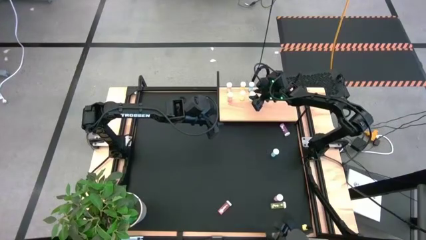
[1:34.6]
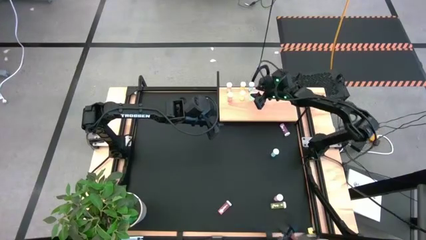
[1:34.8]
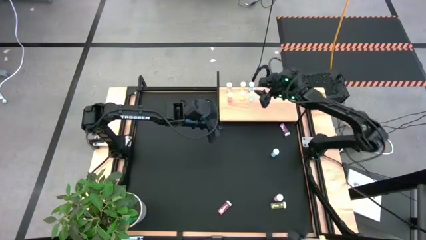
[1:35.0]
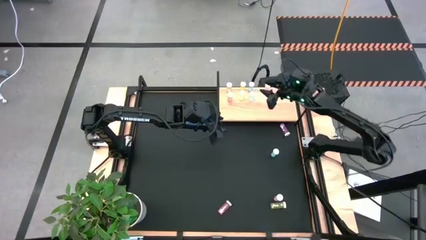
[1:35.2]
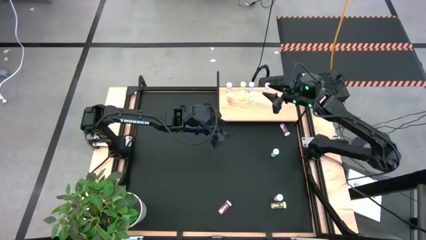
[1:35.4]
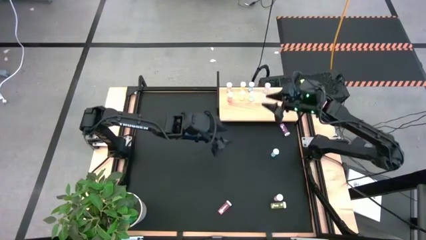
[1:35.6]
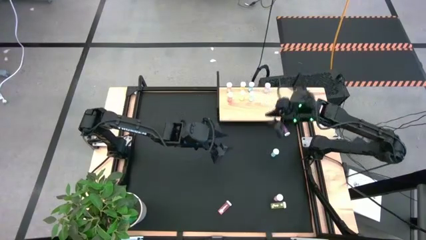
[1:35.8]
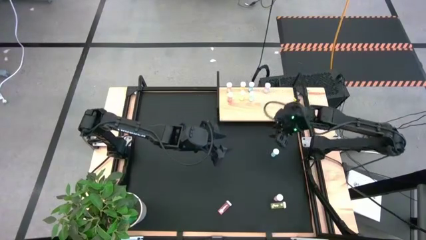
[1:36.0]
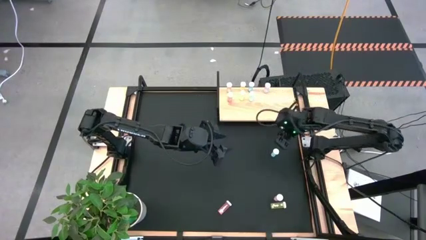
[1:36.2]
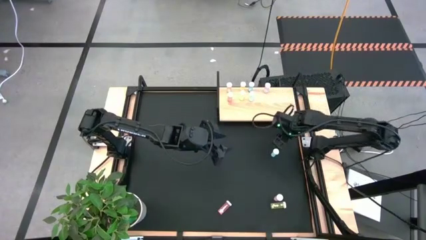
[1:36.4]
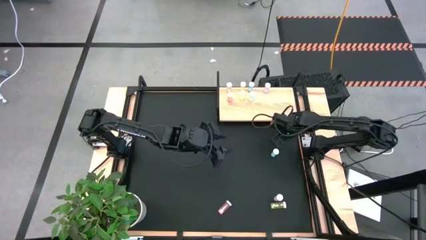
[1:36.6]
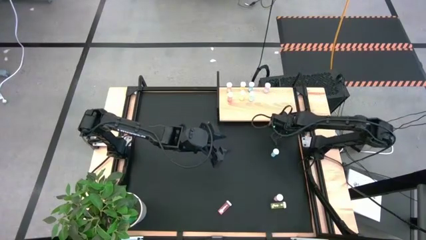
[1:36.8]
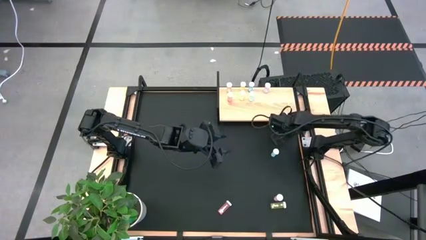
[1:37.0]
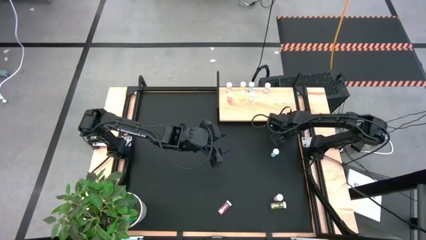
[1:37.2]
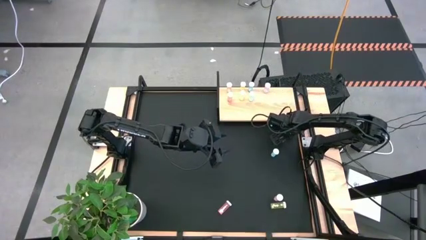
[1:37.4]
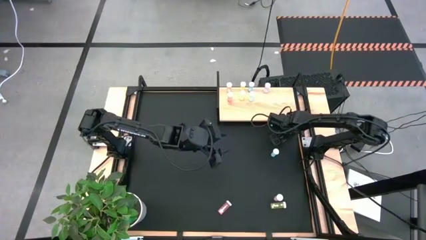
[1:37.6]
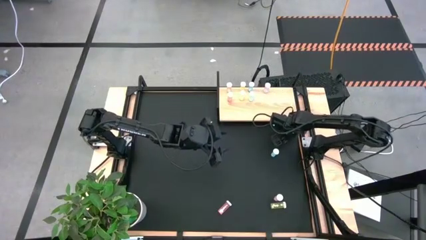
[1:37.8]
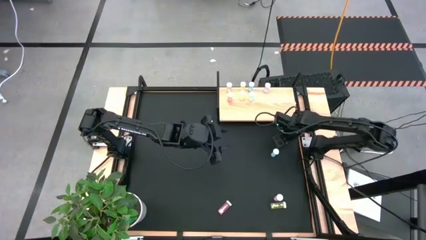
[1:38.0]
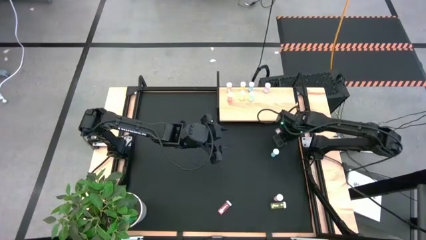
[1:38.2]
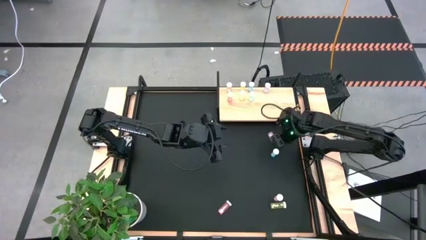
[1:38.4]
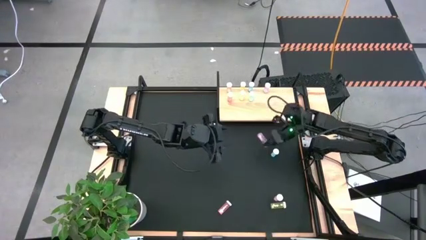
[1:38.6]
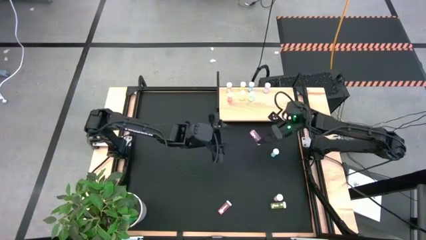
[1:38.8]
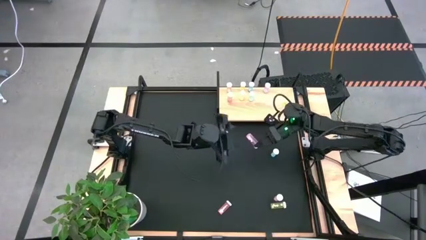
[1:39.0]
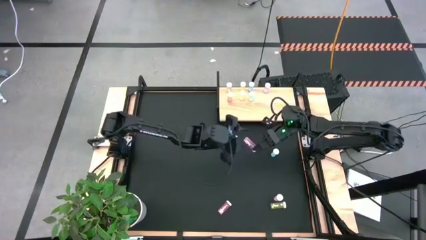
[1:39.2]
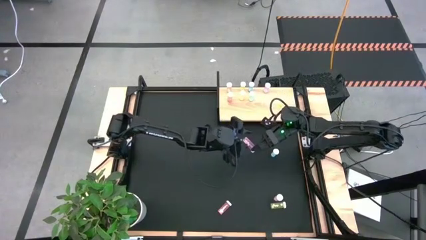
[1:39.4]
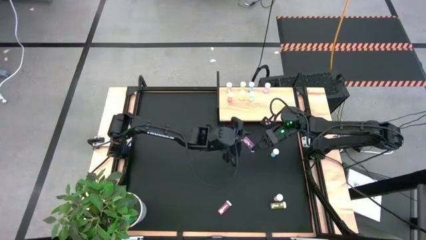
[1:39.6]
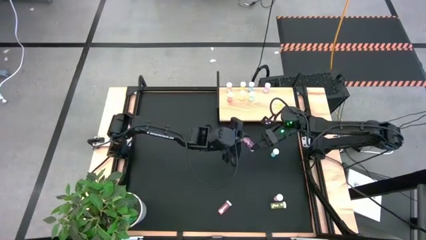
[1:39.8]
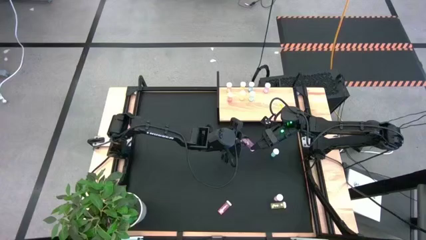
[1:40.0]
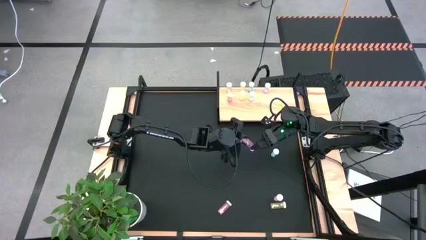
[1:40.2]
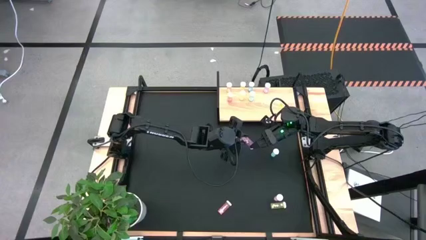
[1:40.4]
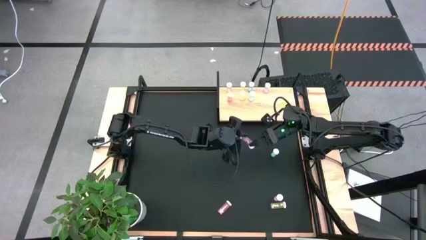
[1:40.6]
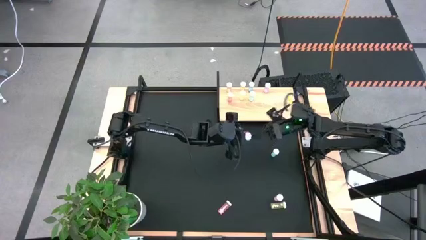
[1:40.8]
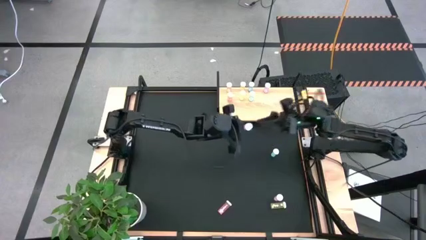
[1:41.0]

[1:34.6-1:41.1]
Task: Pick and place medicine bottles onto shelf by color
Put the top purple pill bottle aligned with the other purple pill bottle on the shelf

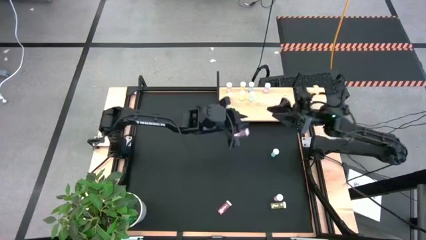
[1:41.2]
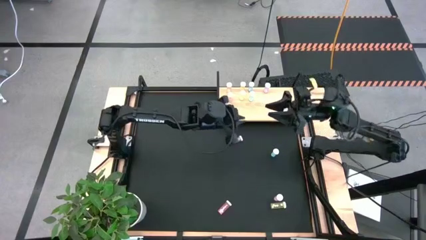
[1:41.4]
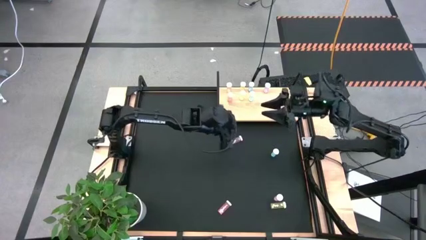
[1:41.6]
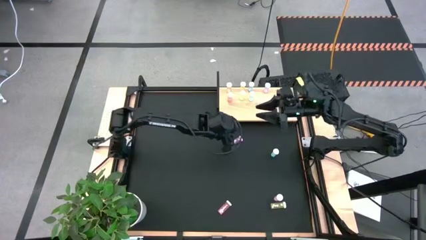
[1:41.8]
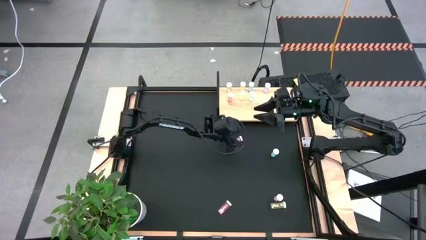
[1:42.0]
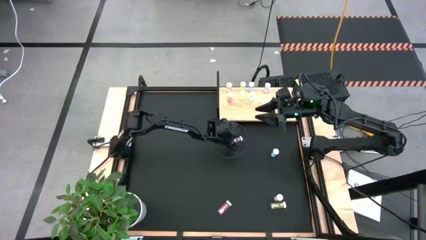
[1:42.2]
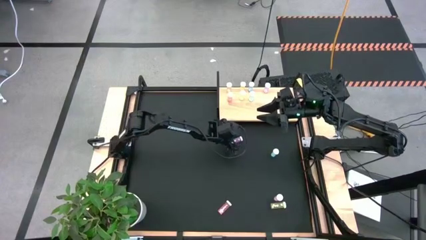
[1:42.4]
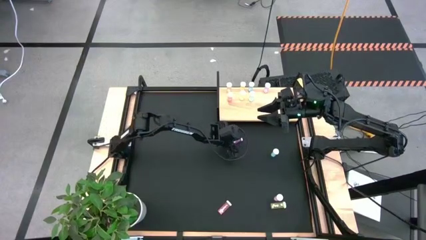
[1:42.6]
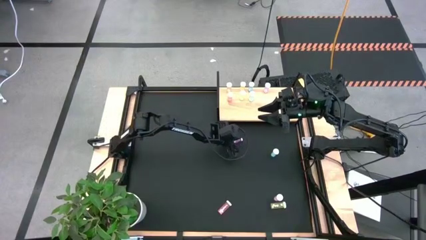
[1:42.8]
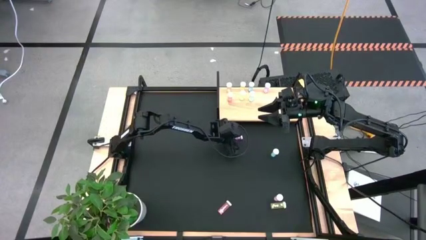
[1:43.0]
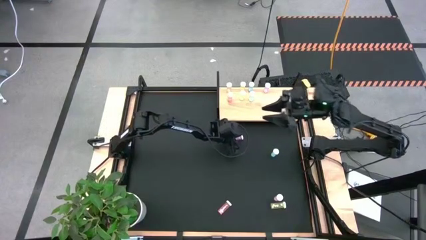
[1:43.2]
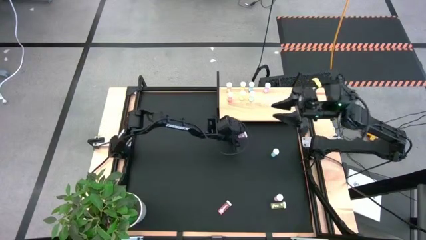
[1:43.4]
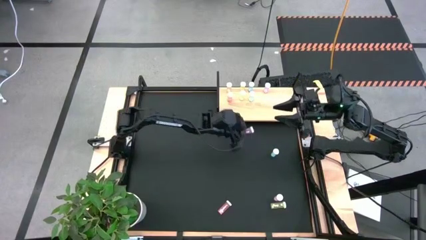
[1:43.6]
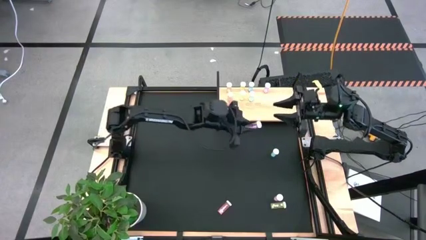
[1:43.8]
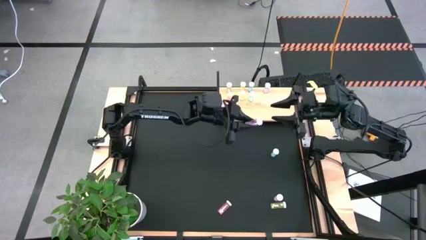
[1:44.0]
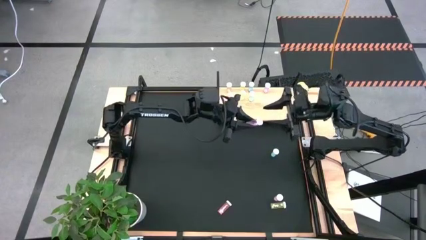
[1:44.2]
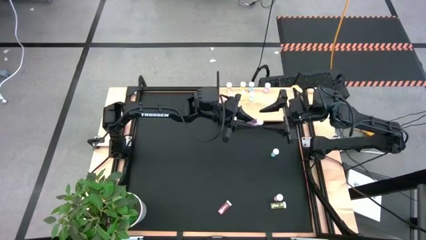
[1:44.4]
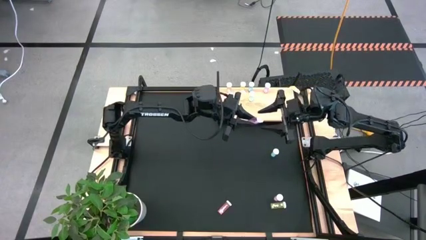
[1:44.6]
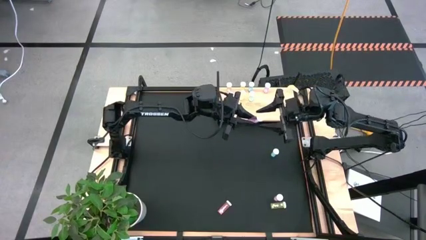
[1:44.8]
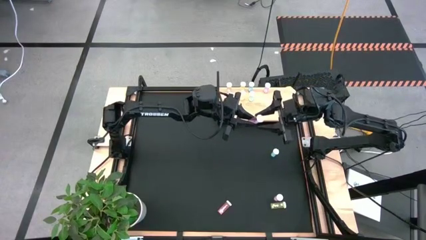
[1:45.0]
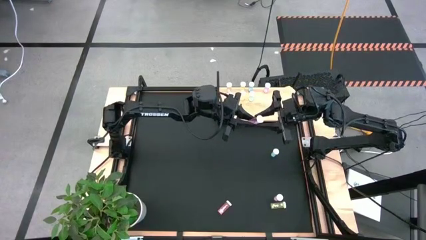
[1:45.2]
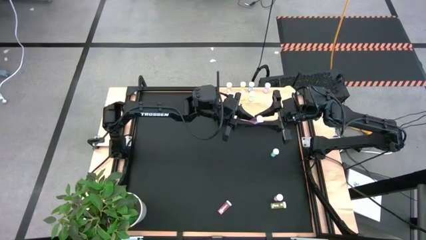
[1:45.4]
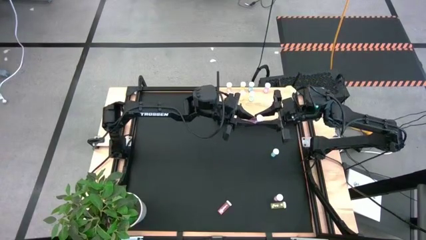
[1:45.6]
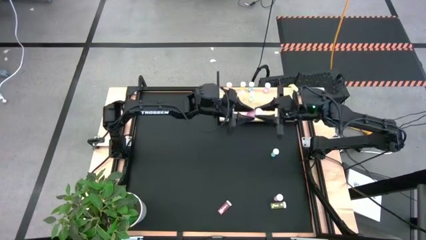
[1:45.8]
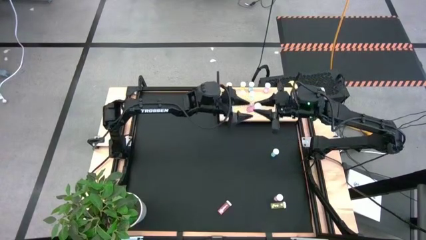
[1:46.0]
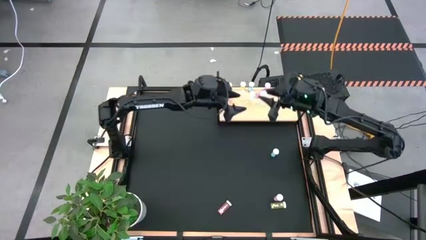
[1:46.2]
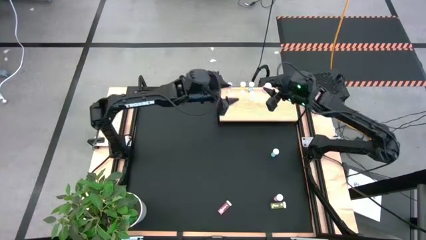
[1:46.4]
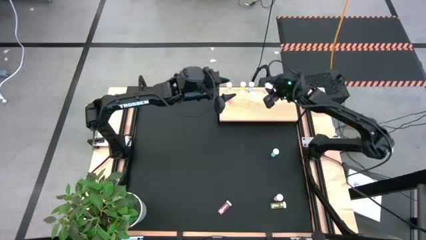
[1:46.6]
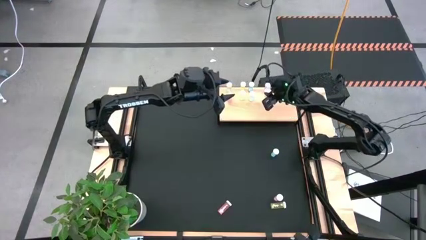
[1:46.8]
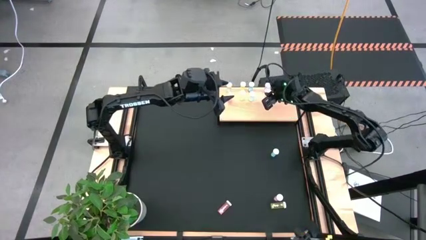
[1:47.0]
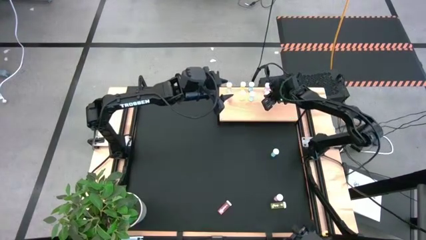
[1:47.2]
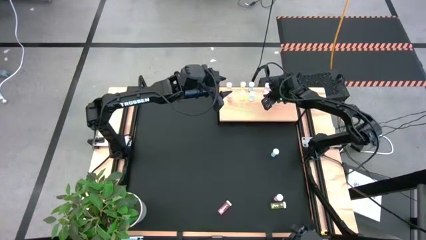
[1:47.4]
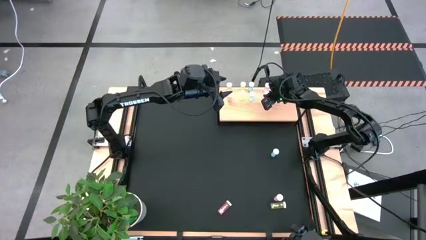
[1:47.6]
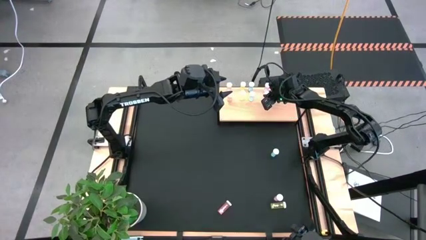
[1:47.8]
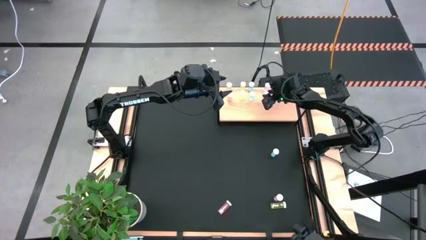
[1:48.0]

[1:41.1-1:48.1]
Put the top purple pill bottle aligned with the other purple pill bottle on the shelf
